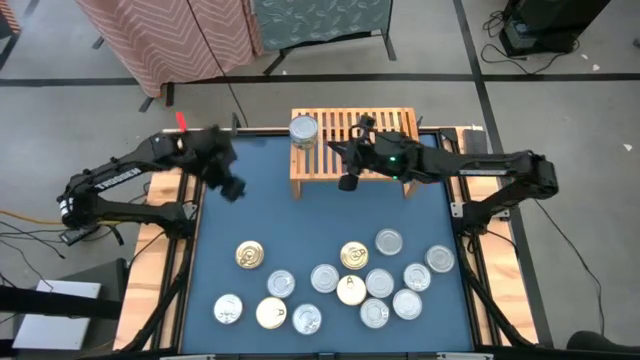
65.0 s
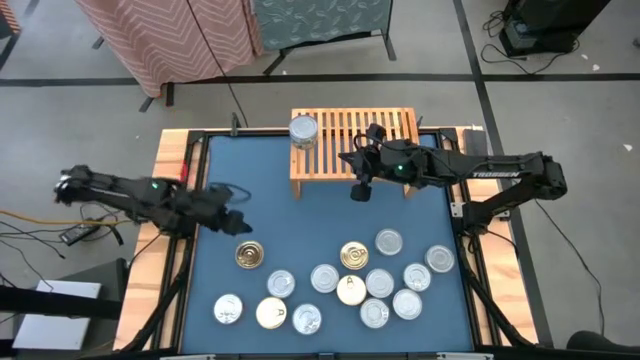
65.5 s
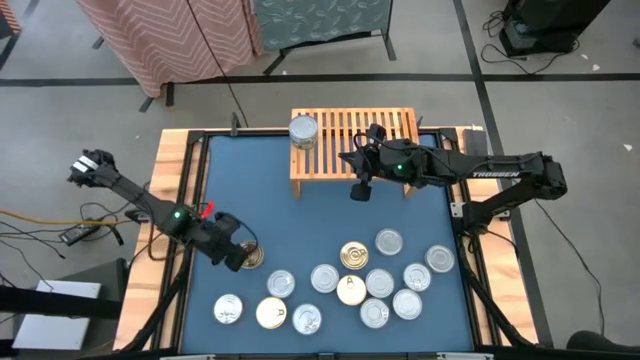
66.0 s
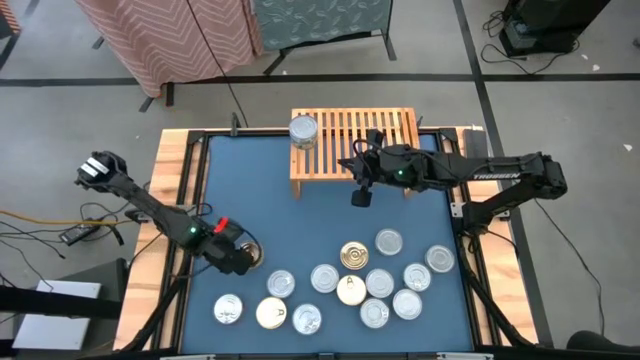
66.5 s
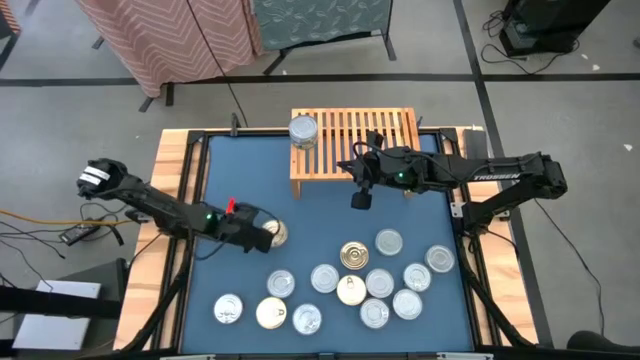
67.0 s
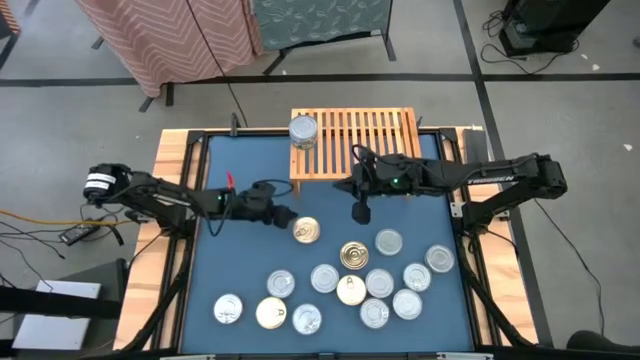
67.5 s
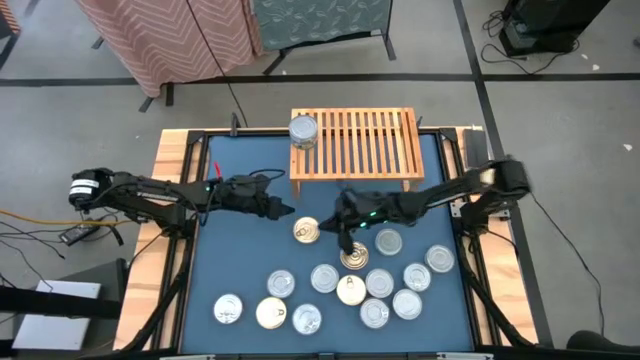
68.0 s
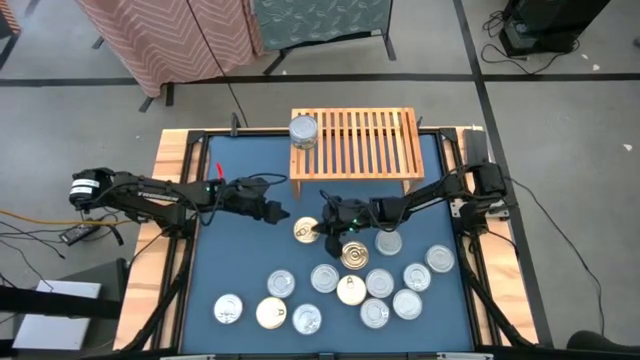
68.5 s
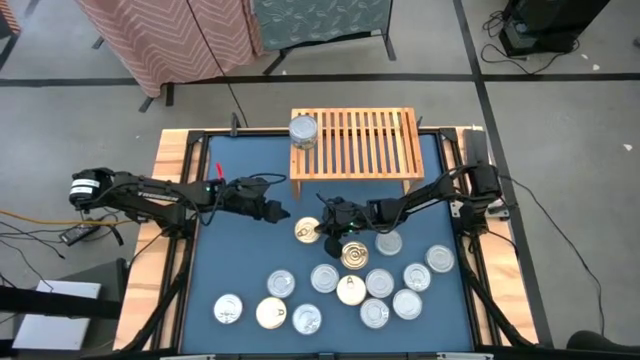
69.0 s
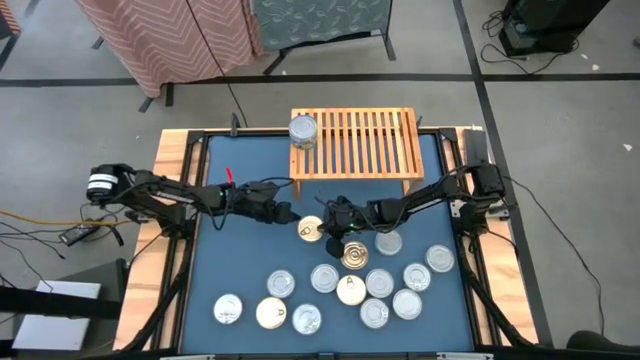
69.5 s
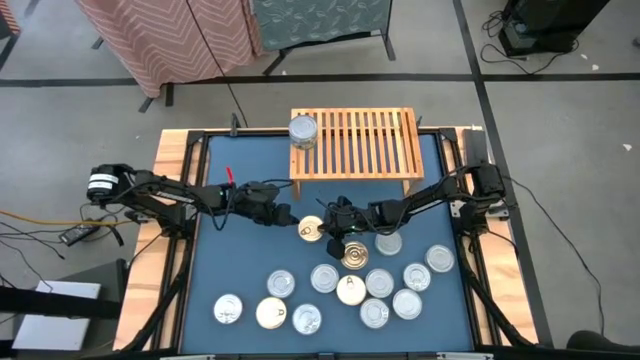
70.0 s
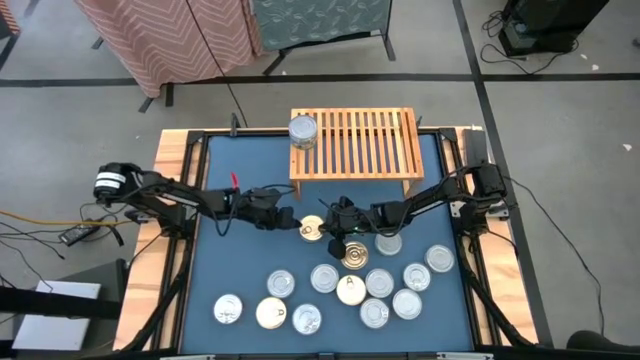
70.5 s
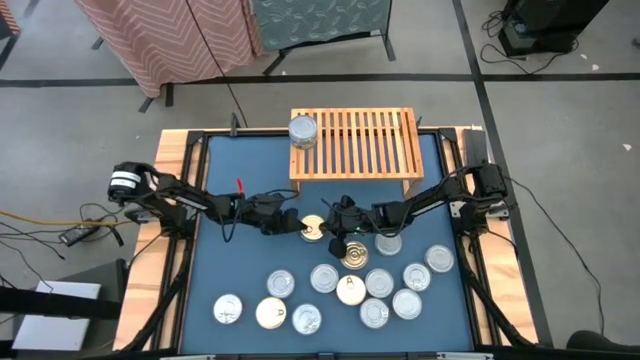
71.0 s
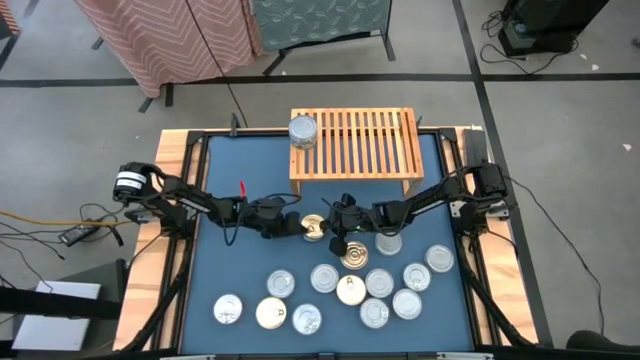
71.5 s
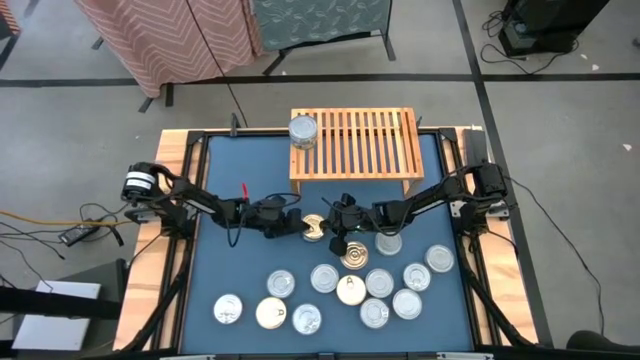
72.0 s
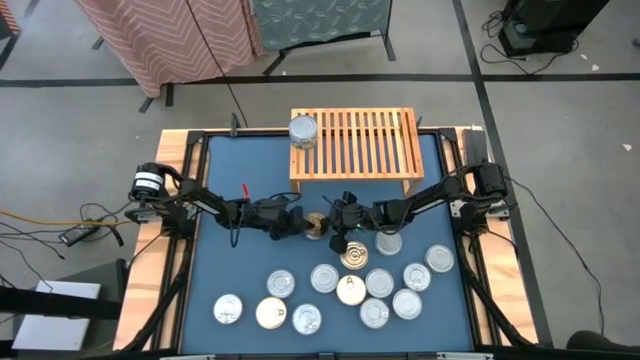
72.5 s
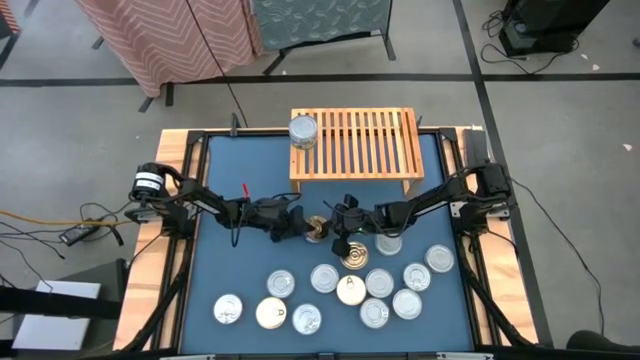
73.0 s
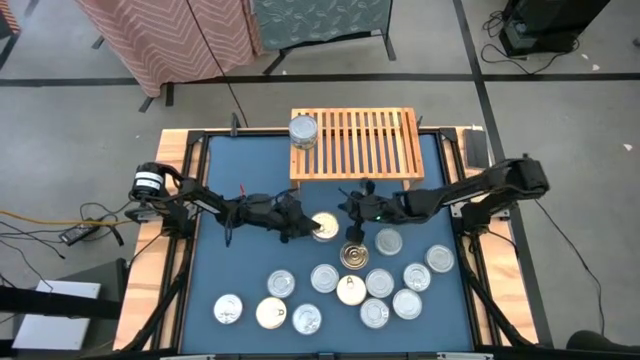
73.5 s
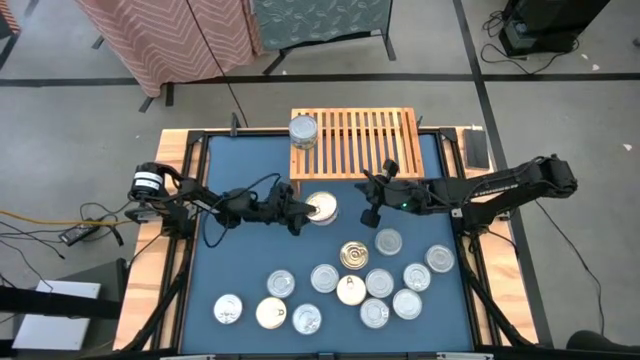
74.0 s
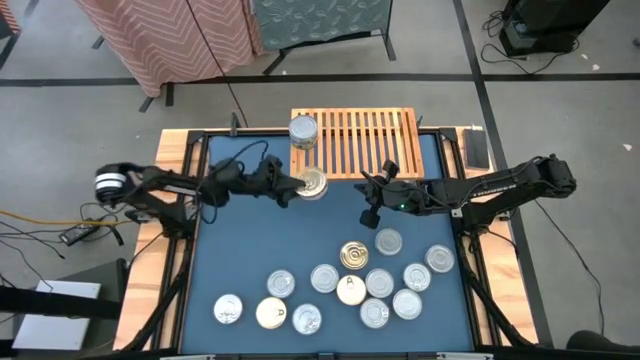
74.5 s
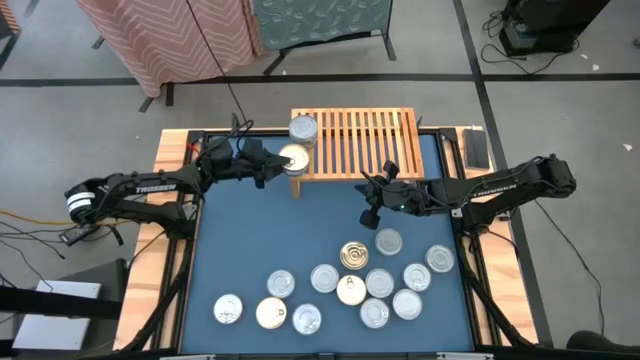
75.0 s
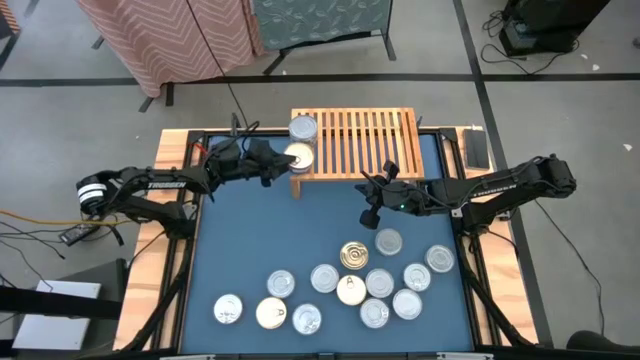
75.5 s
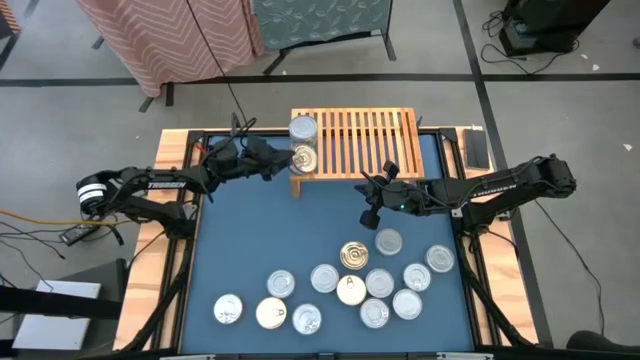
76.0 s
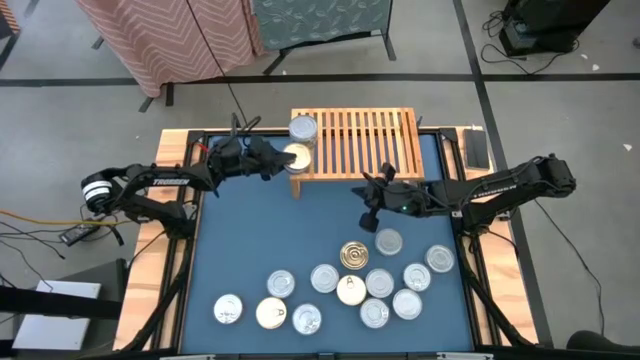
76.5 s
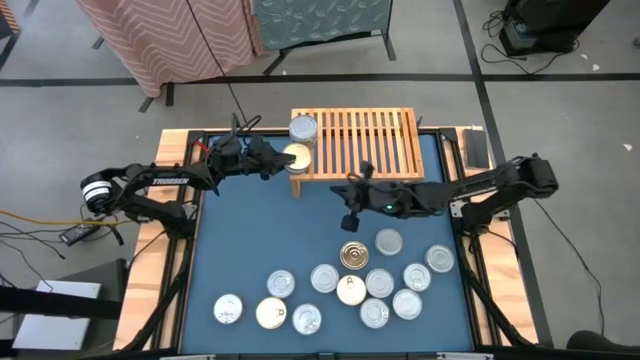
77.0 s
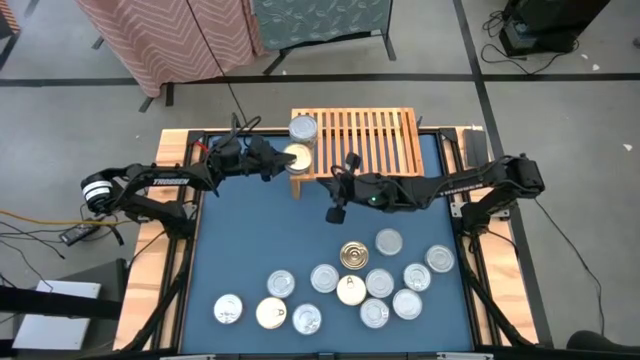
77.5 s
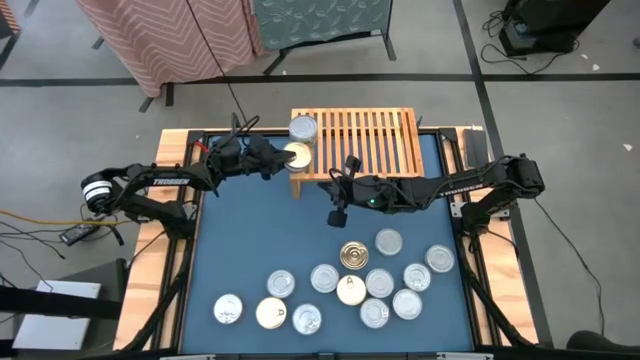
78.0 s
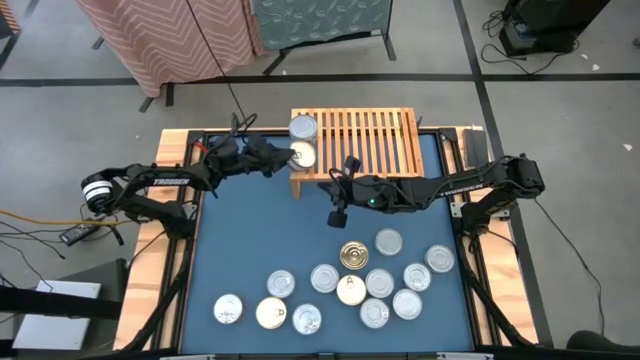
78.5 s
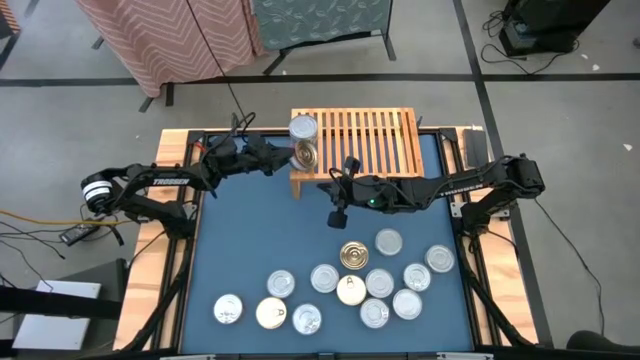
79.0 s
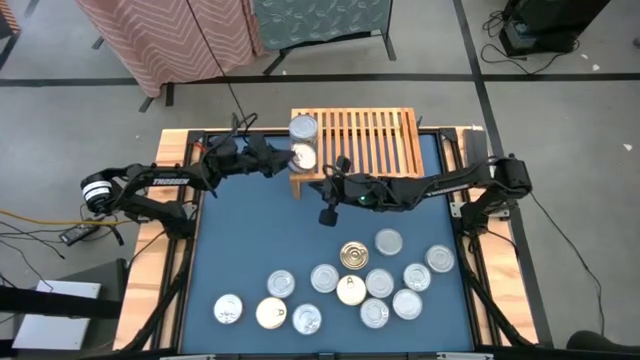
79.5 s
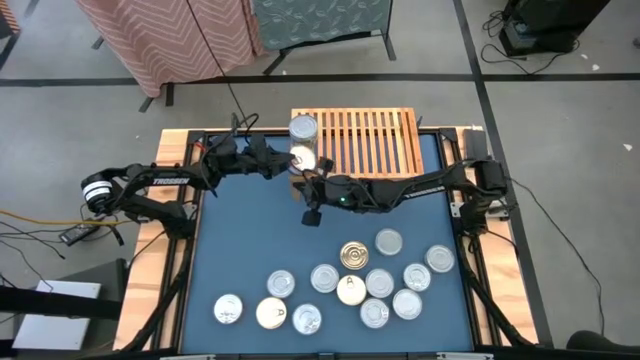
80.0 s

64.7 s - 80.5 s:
Task: Stack canned seafood by type on shelf
Put the blue tuna can on the shelf aligned with the green tuna can

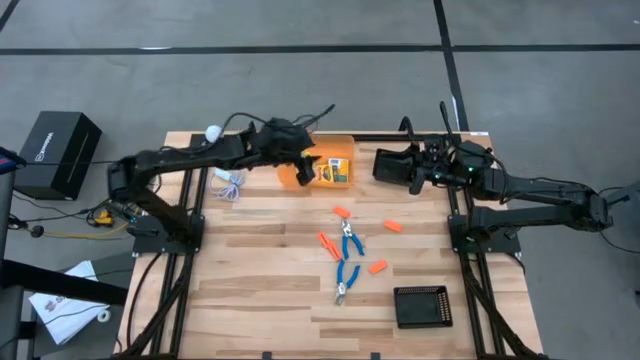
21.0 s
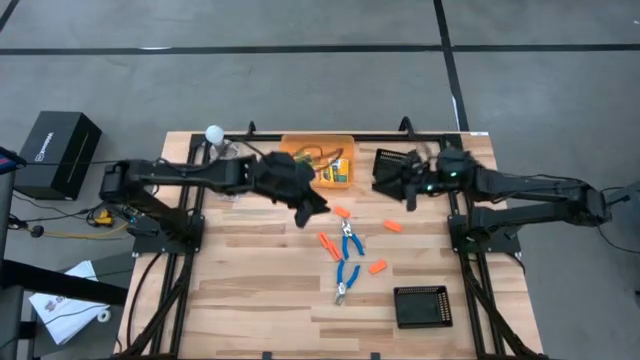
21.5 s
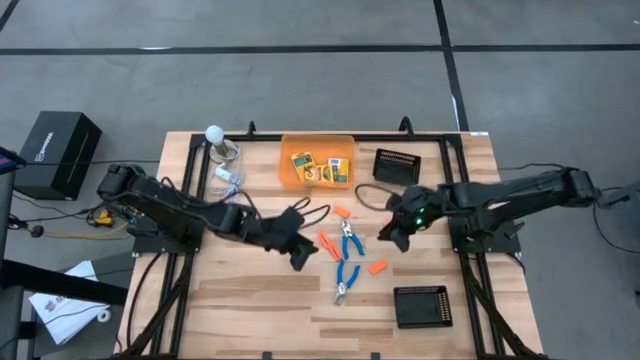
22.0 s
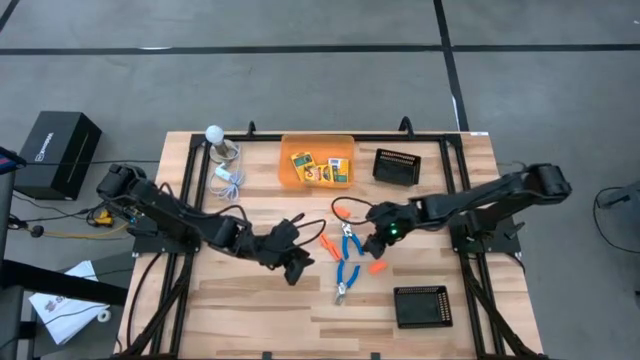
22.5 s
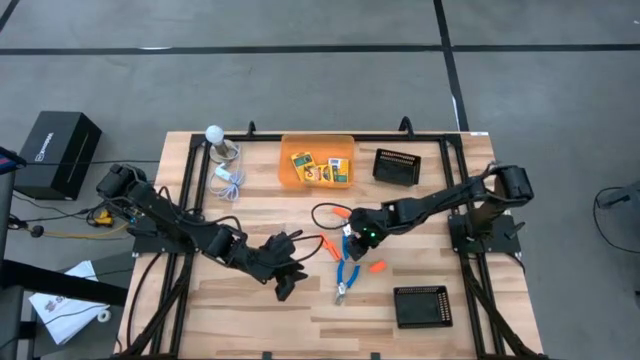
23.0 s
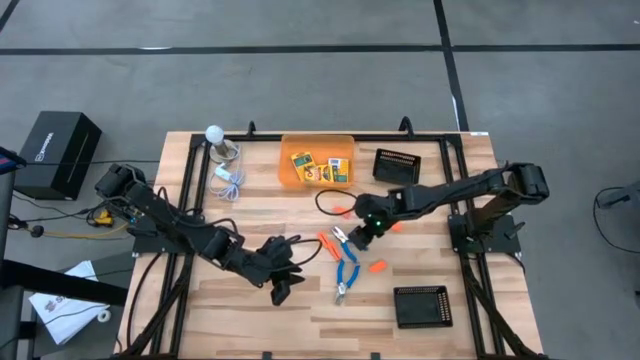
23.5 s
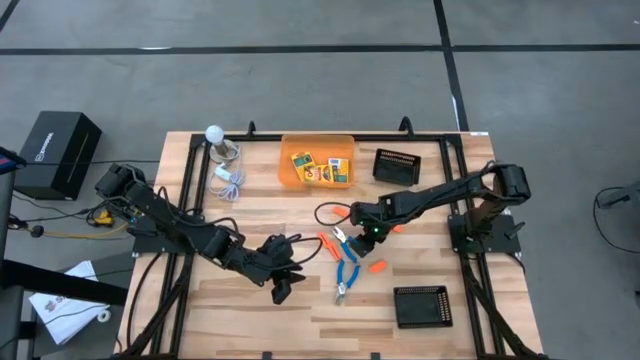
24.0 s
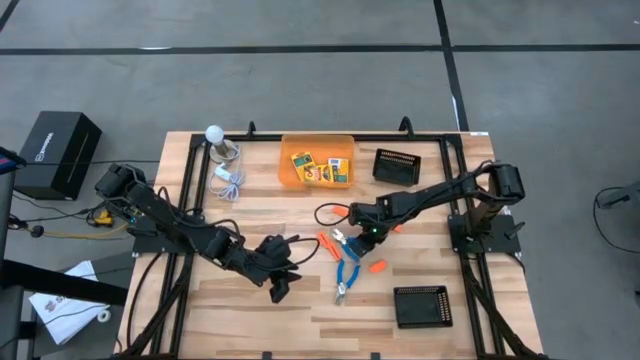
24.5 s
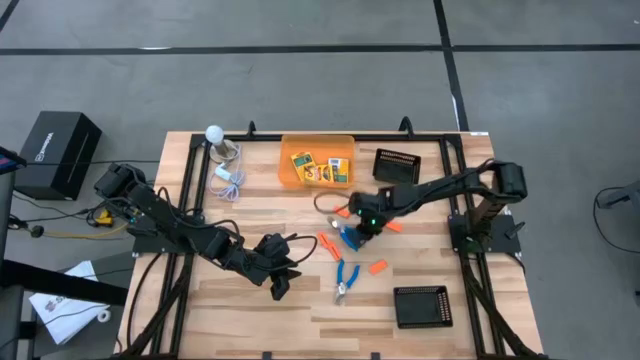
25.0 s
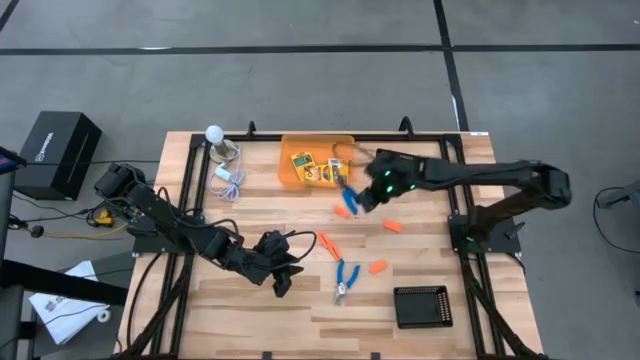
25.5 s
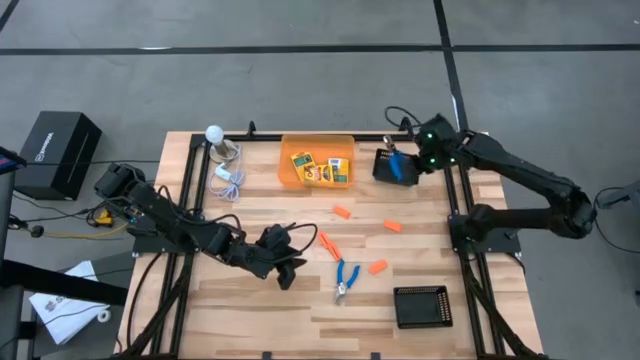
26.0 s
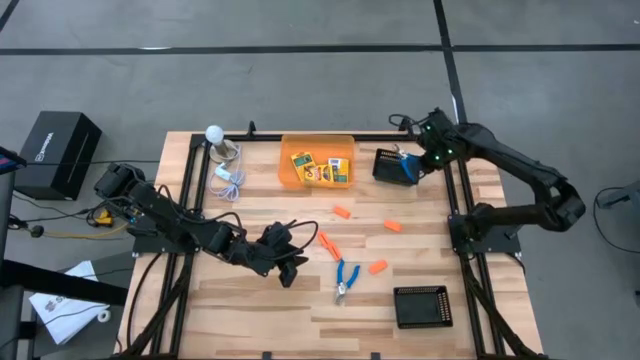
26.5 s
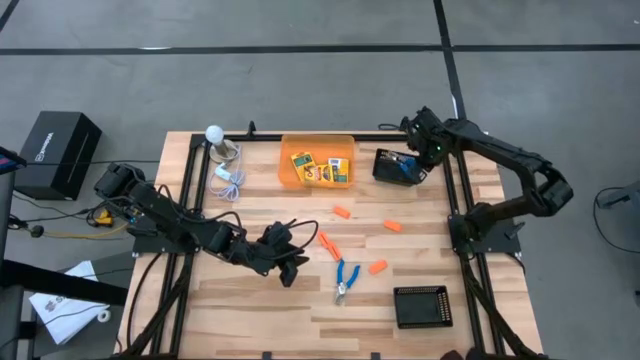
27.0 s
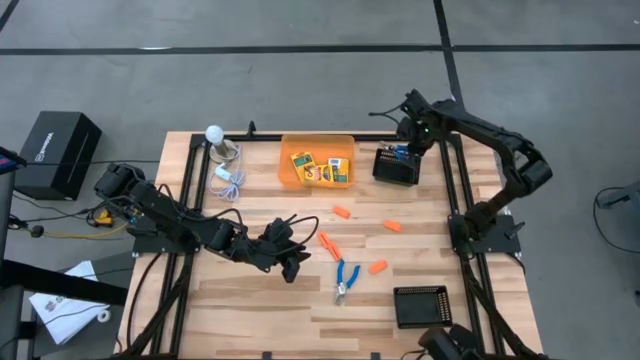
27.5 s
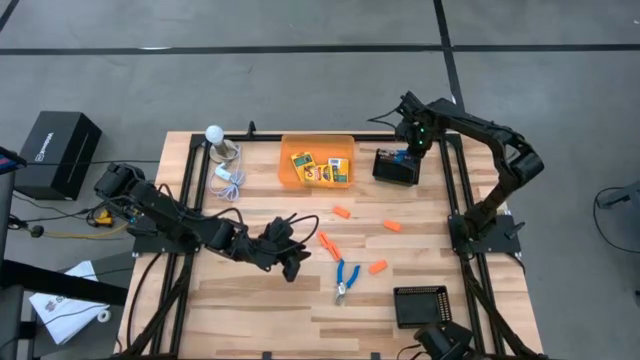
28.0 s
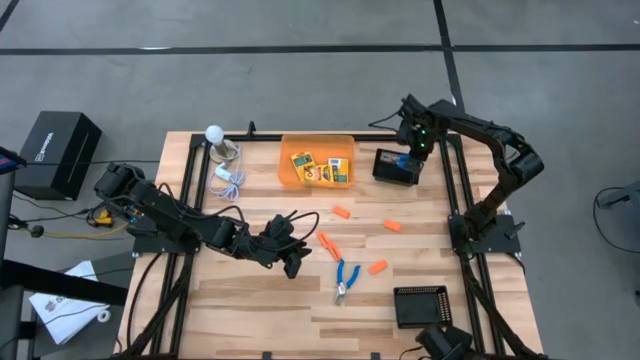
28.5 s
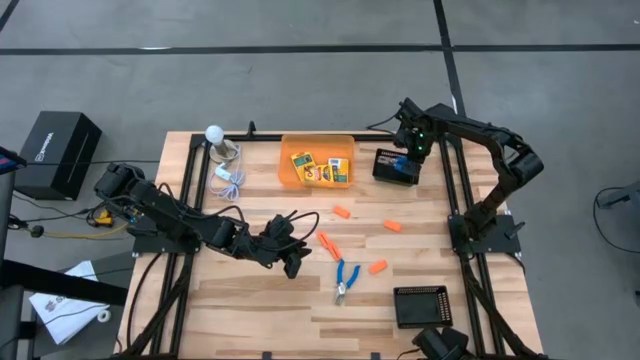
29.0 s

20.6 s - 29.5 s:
Task: Pick & Place School Supplies
Put the blue hole punch into the top black bin
